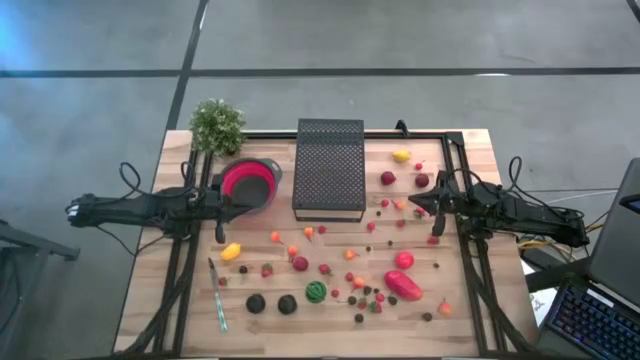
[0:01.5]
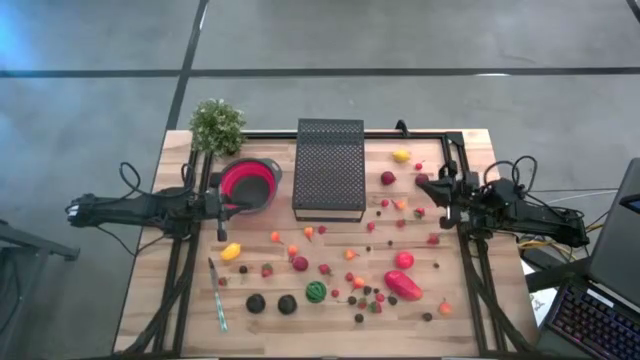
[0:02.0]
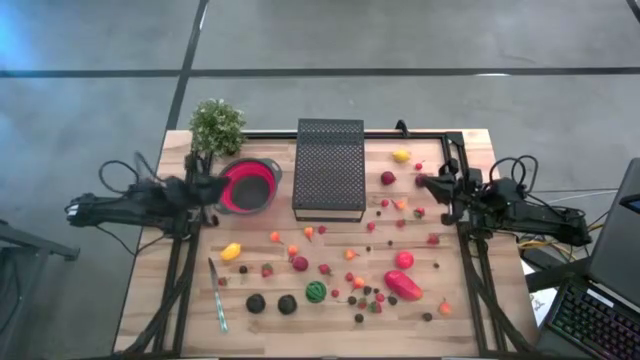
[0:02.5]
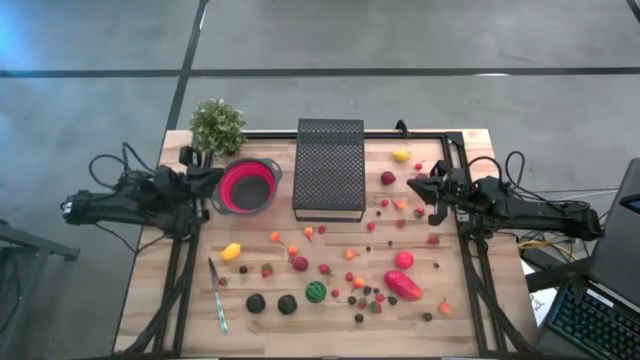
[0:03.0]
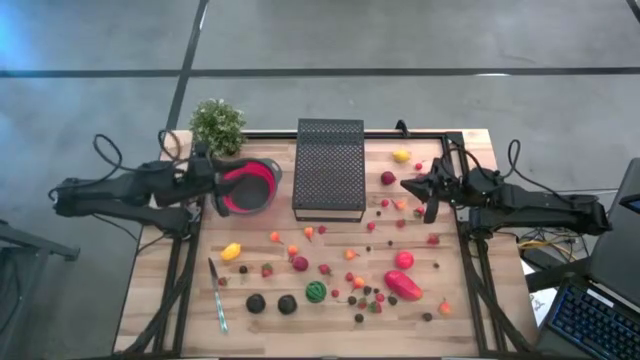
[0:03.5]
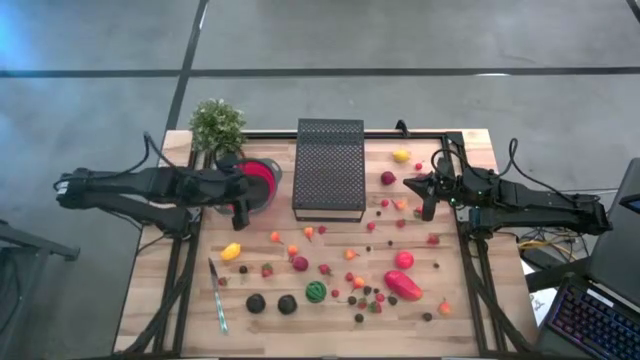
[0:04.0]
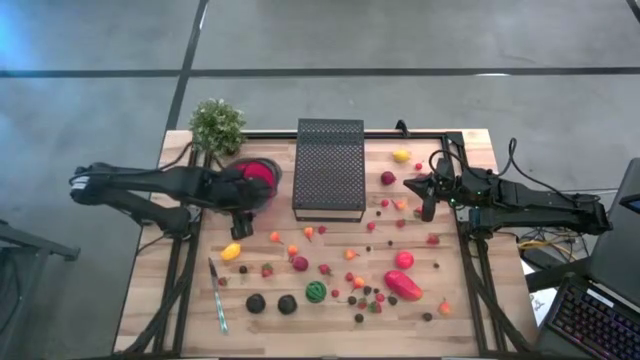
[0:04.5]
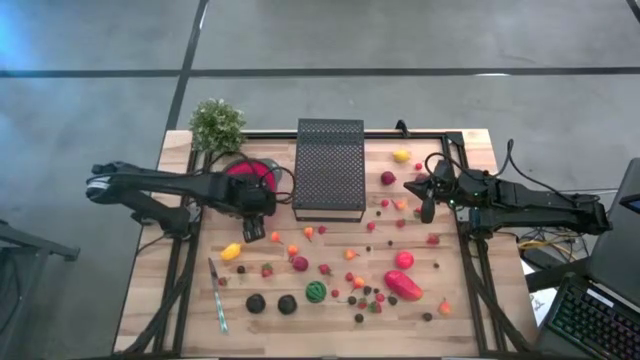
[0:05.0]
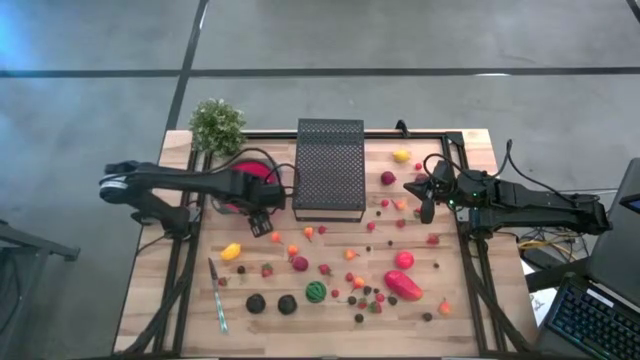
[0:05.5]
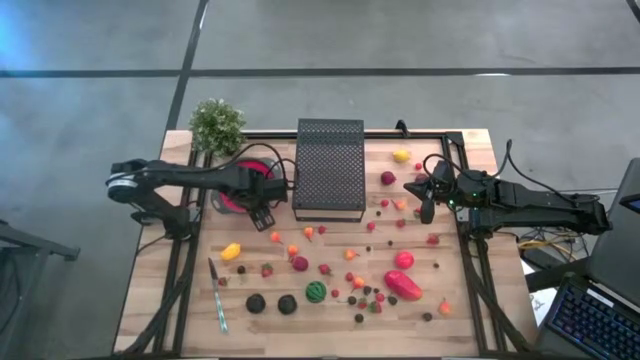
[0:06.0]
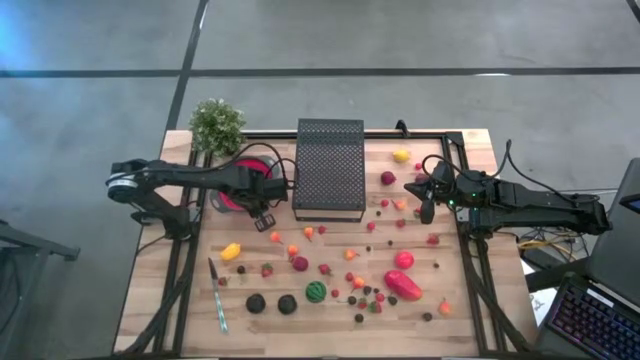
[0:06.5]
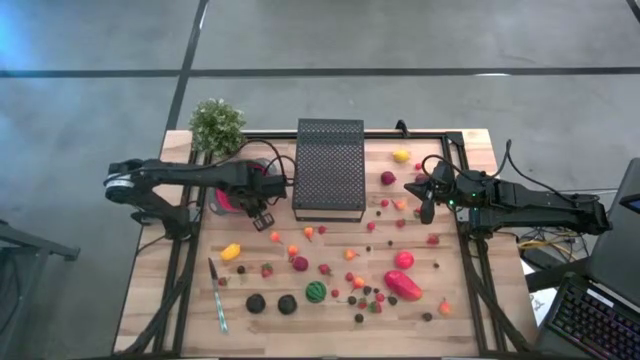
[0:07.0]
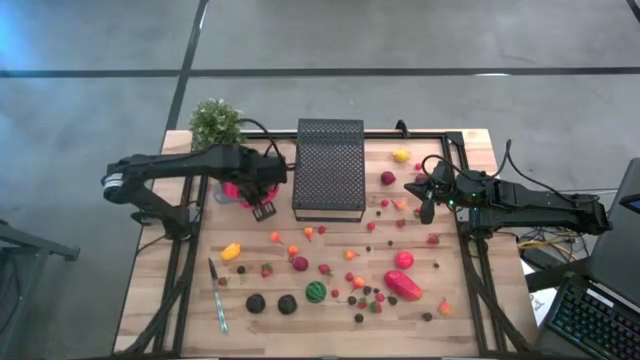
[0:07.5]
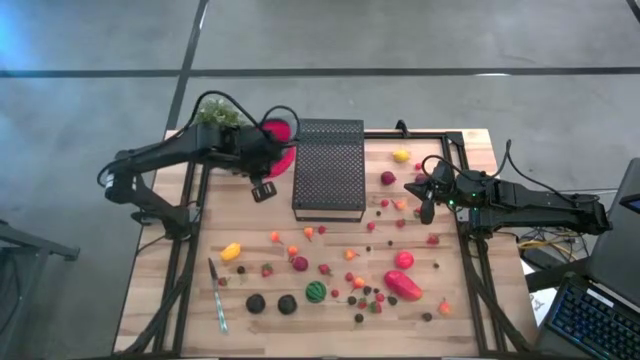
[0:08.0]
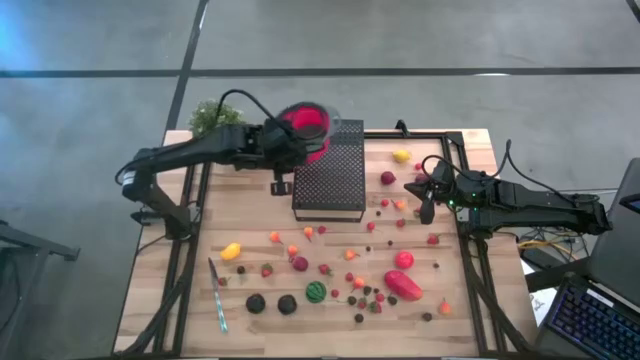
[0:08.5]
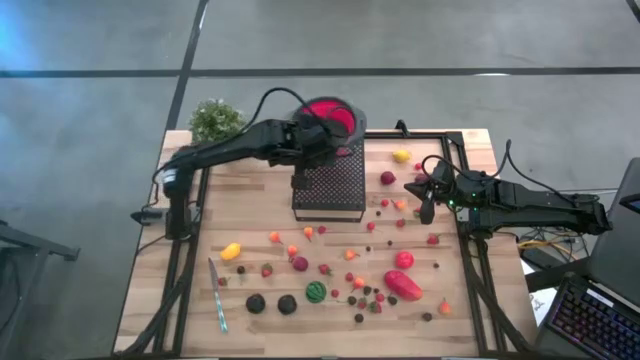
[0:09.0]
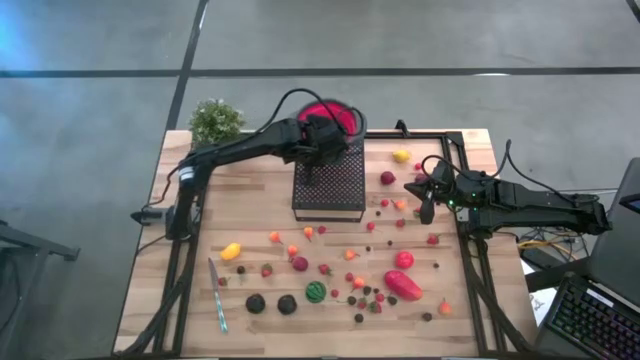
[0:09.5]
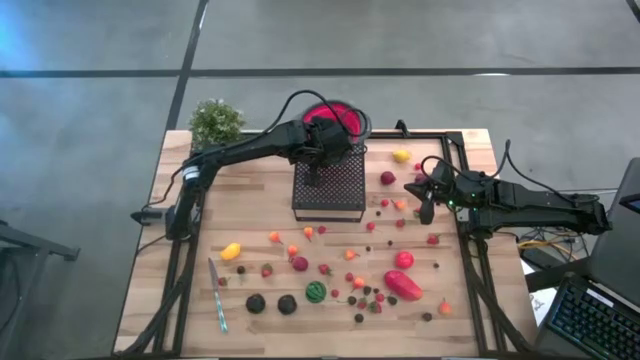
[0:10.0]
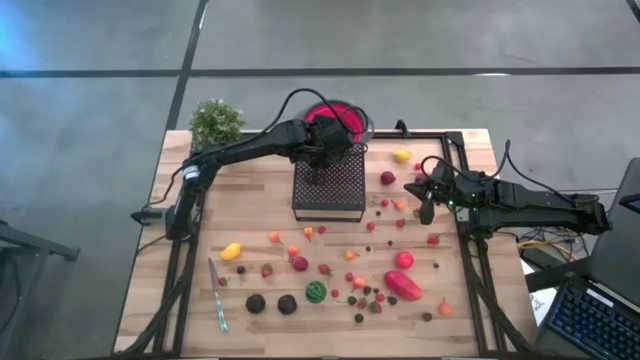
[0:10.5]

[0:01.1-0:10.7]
Task: Pick & Place Fruit
Put the red strainer bowl on the shelf

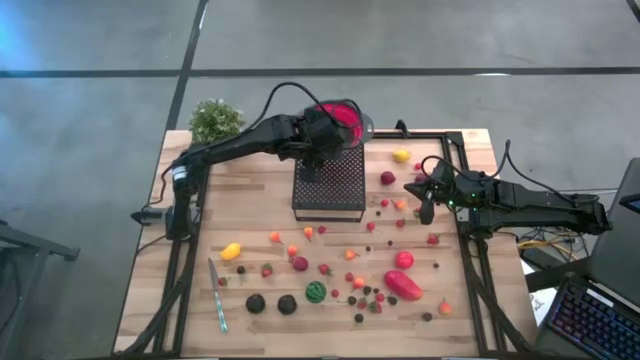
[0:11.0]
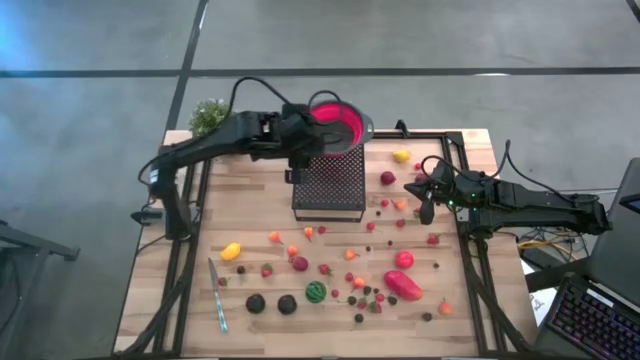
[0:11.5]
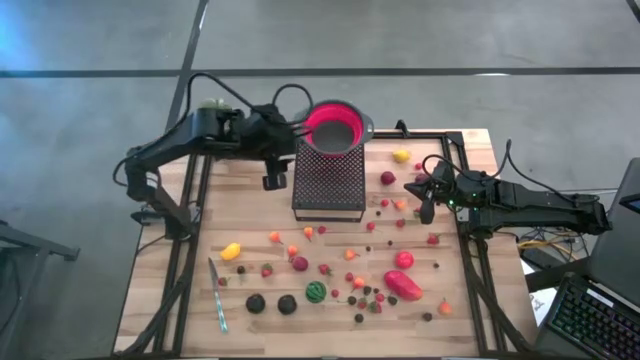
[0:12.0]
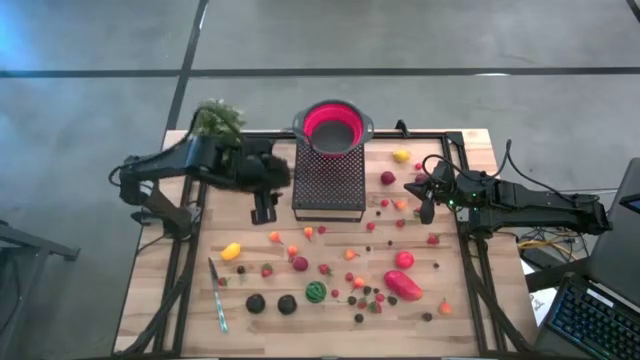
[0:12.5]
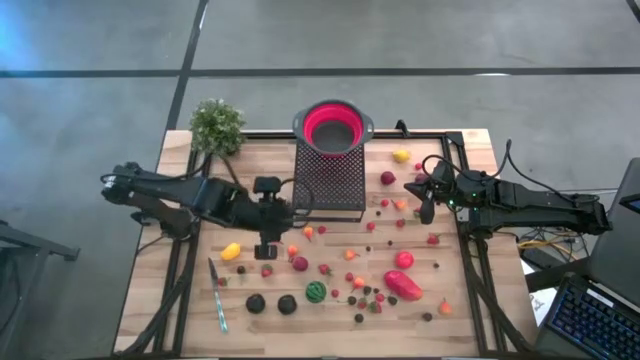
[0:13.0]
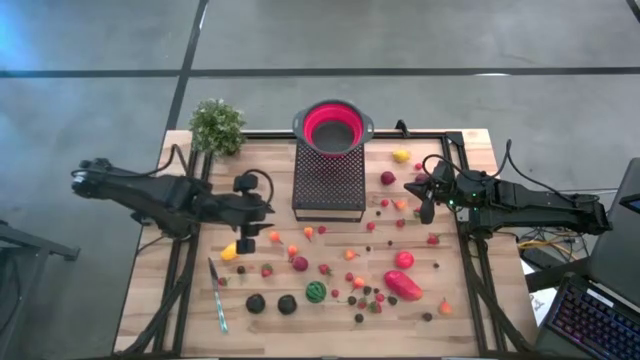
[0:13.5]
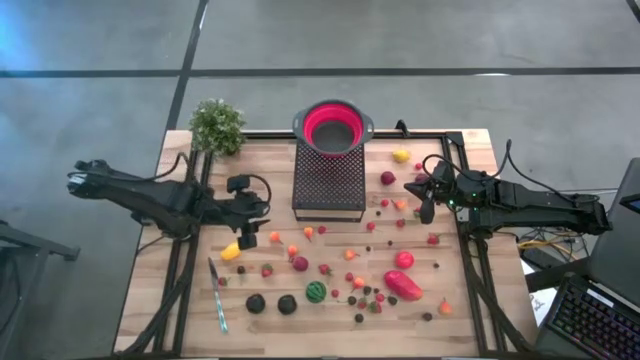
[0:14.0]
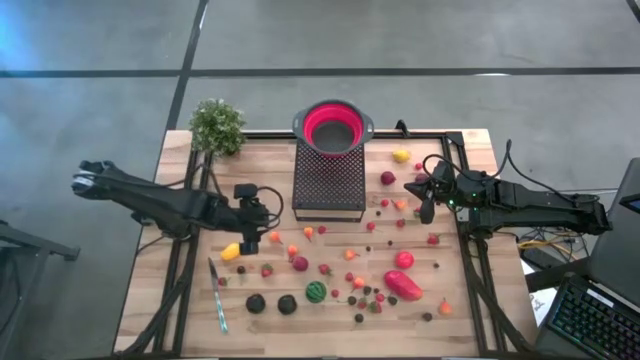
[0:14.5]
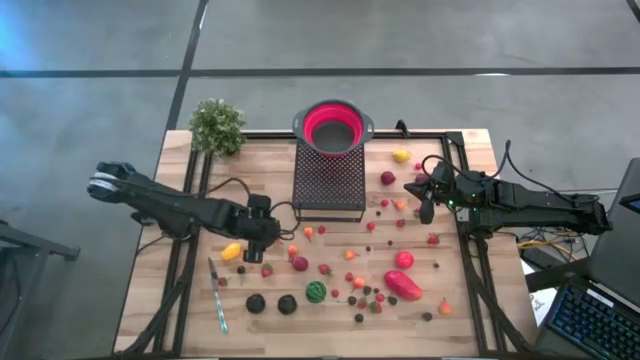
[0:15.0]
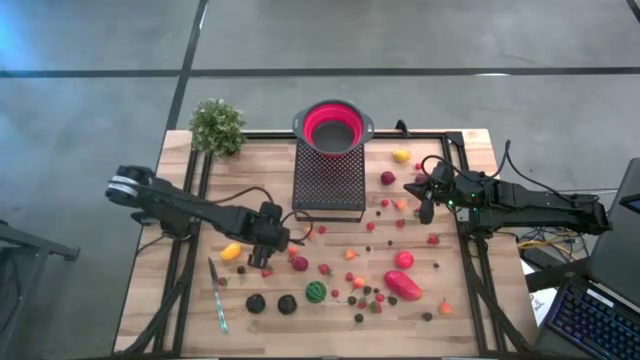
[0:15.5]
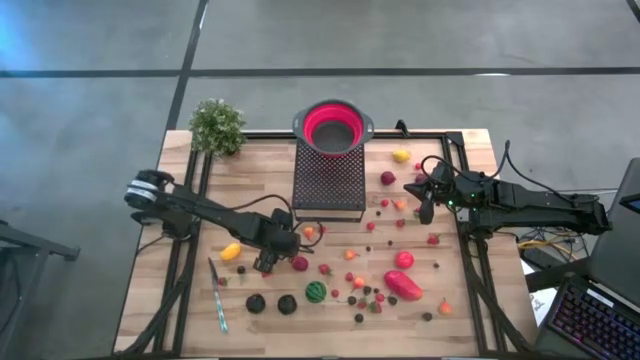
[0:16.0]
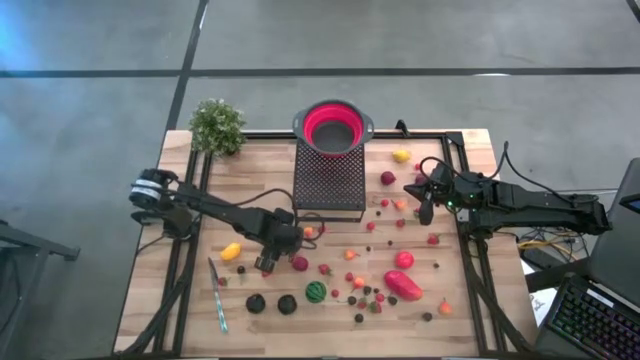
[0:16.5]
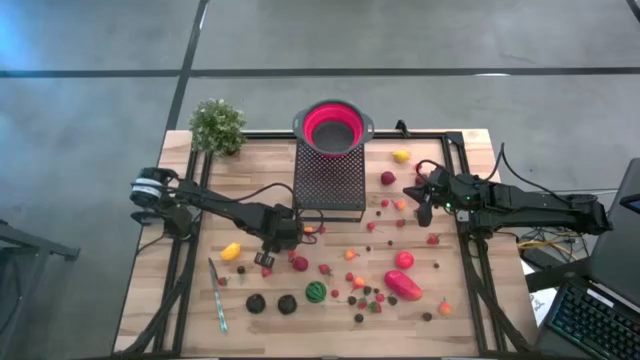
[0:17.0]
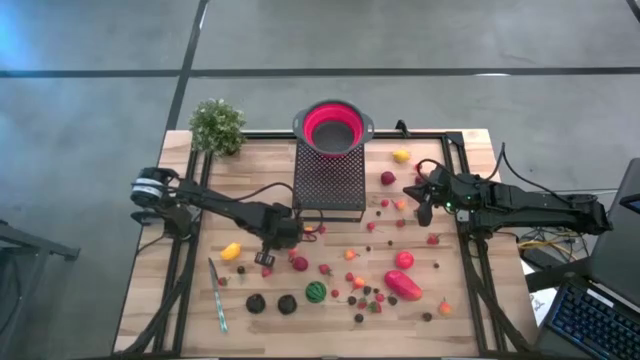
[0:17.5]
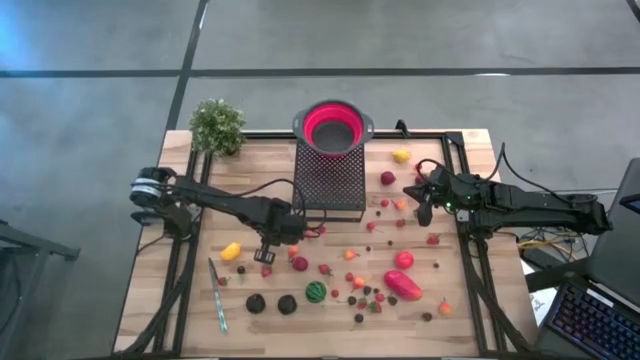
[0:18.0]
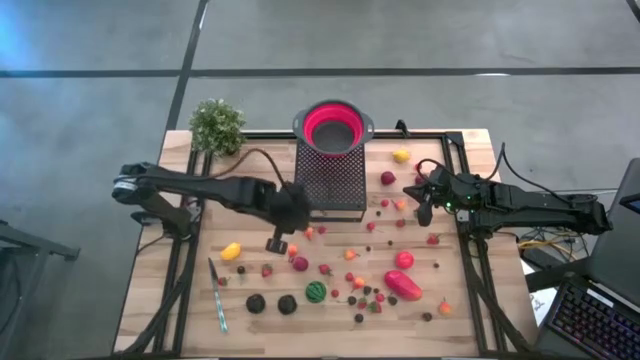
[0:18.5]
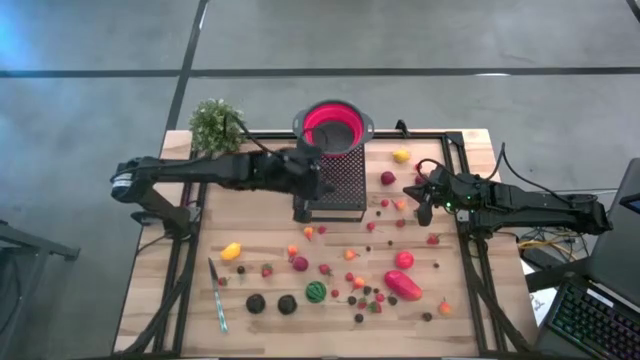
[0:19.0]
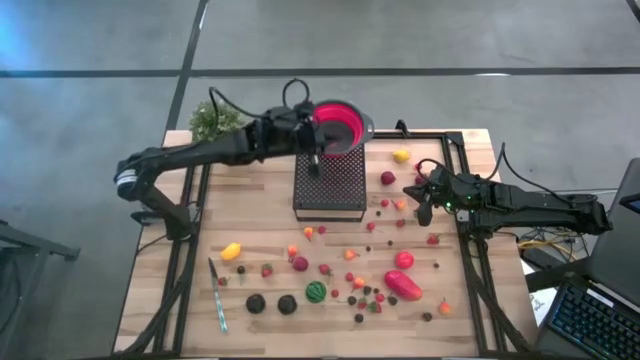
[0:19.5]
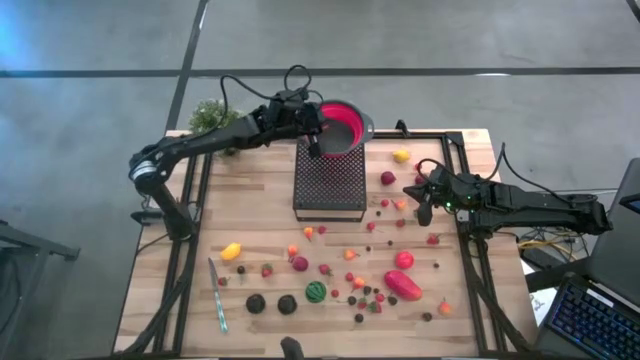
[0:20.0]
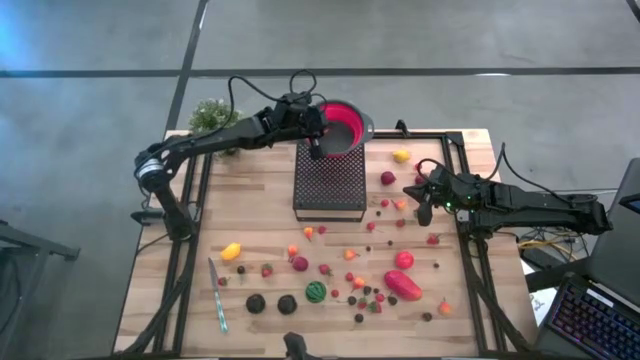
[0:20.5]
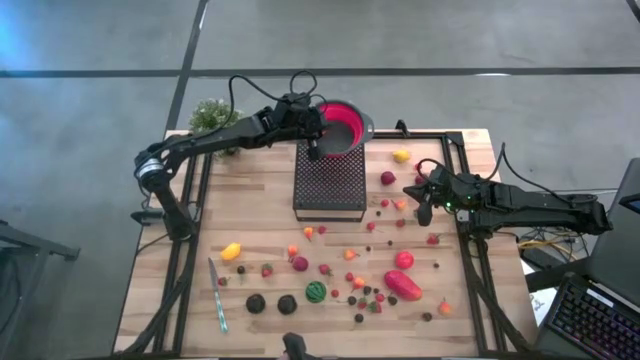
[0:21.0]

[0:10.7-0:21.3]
Put the pear into the red strainer bowl on the shelf

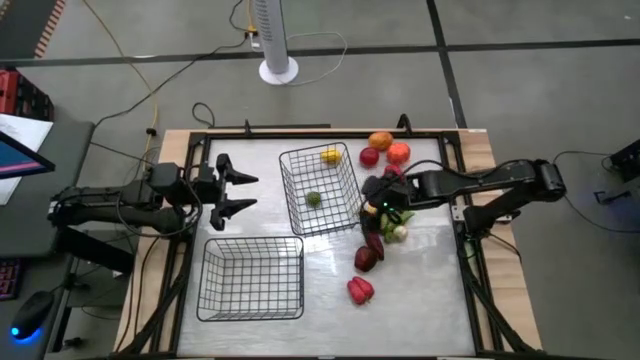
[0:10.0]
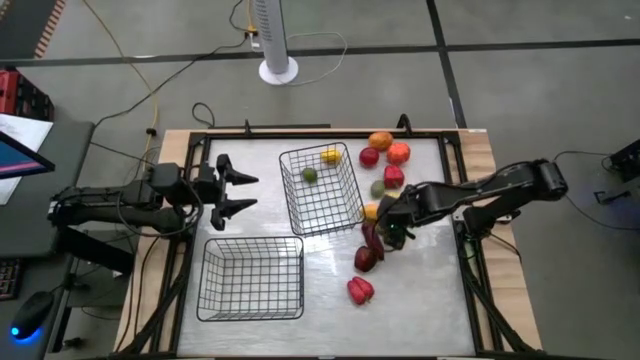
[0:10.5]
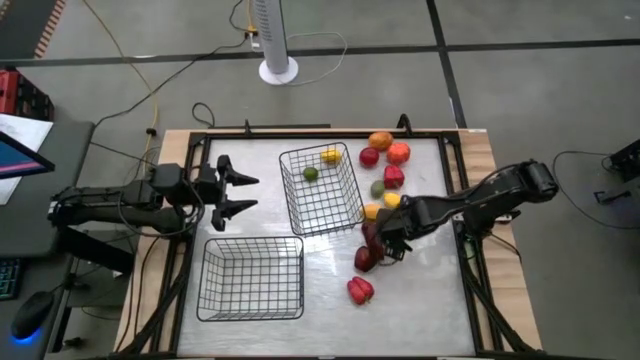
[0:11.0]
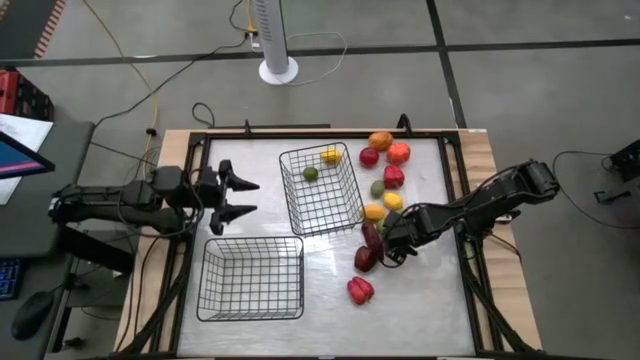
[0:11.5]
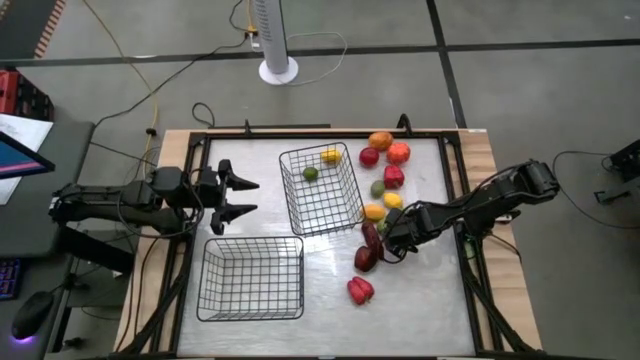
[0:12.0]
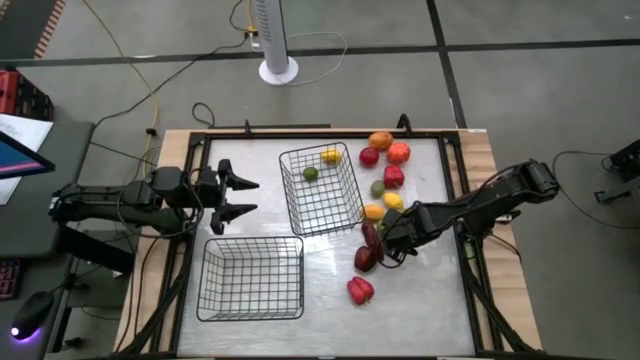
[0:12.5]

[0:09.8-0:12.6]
Task: Sort produce into baskets
Put the white garlic into the bottom black wire basket
